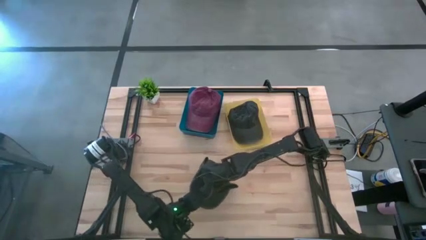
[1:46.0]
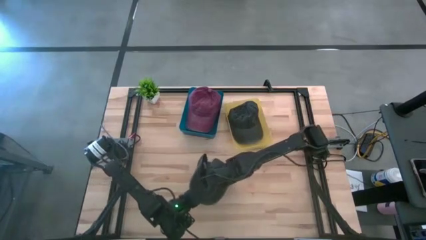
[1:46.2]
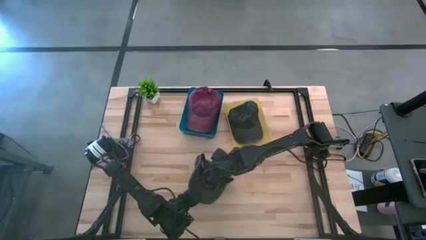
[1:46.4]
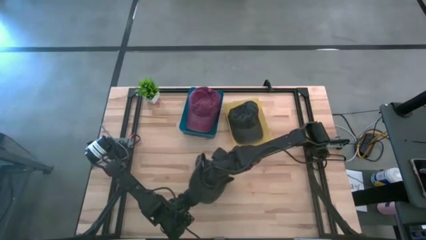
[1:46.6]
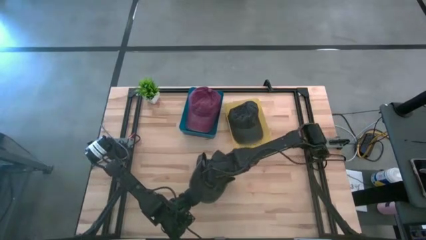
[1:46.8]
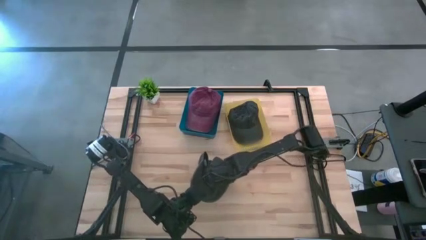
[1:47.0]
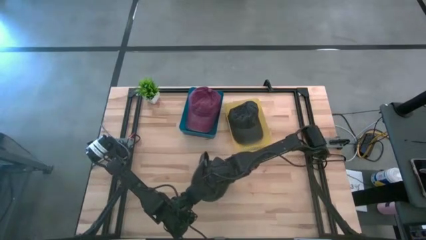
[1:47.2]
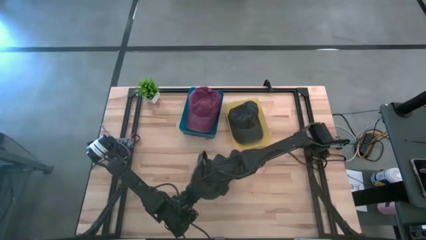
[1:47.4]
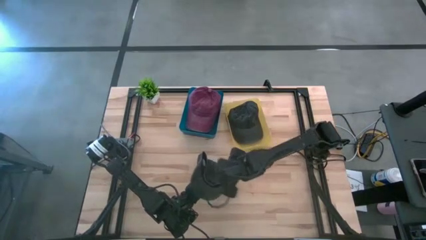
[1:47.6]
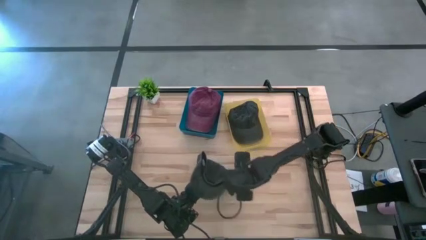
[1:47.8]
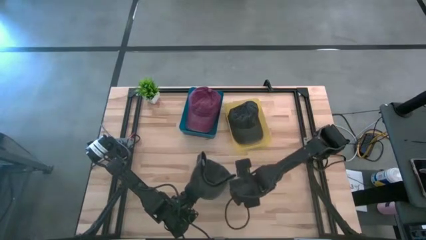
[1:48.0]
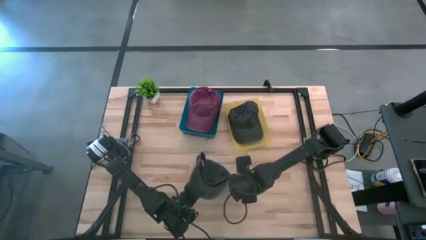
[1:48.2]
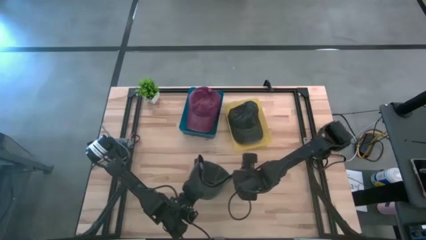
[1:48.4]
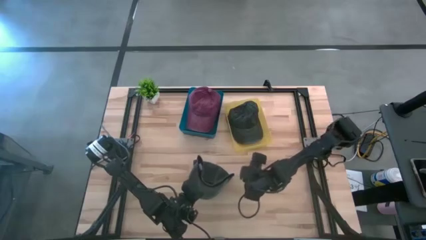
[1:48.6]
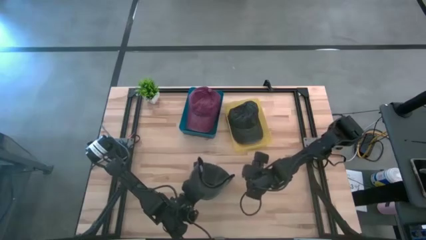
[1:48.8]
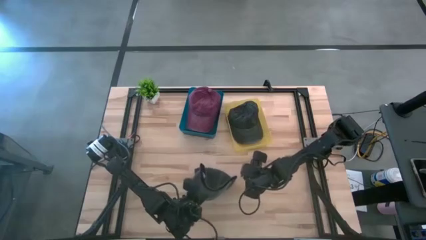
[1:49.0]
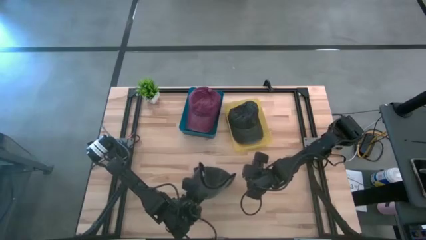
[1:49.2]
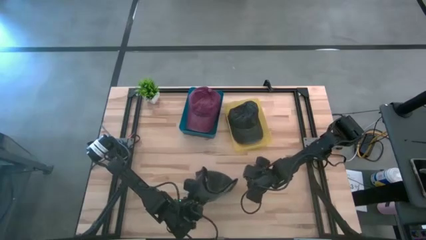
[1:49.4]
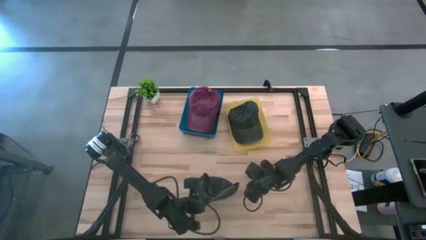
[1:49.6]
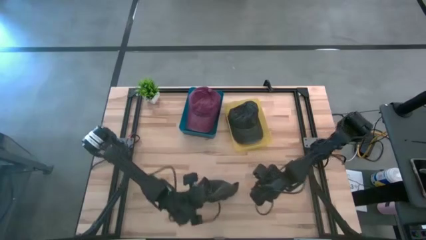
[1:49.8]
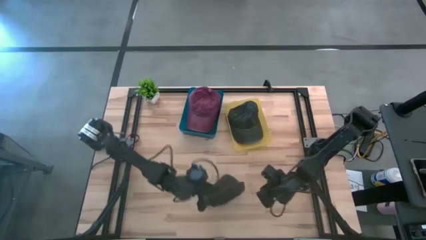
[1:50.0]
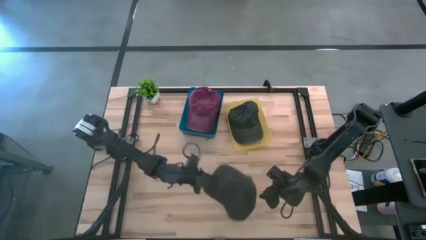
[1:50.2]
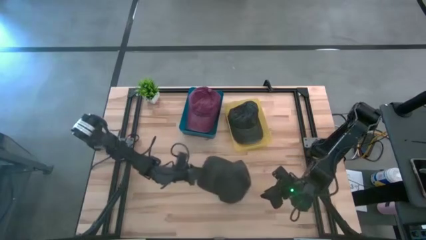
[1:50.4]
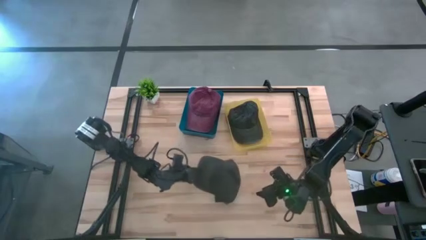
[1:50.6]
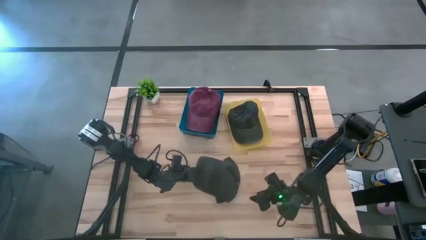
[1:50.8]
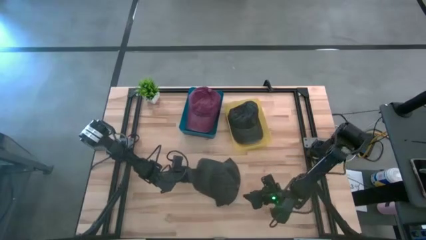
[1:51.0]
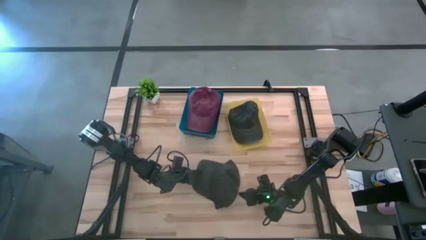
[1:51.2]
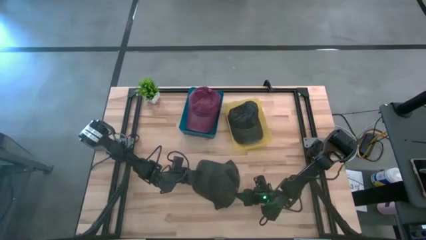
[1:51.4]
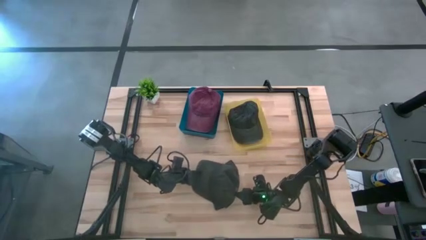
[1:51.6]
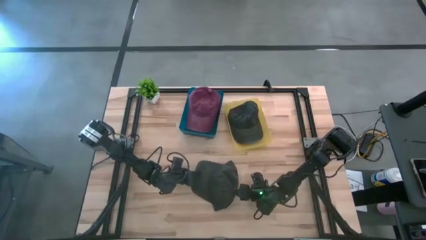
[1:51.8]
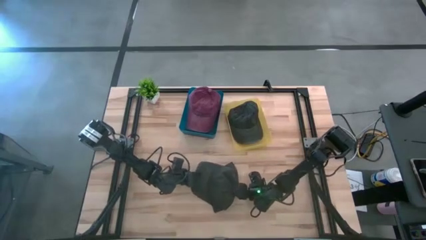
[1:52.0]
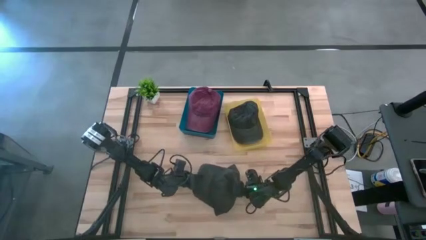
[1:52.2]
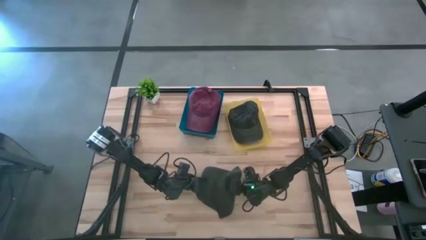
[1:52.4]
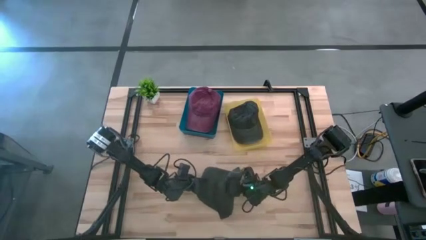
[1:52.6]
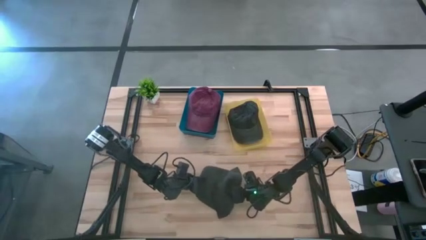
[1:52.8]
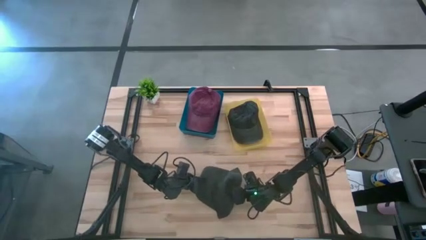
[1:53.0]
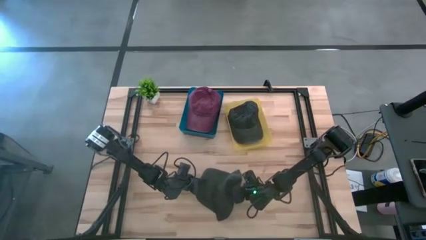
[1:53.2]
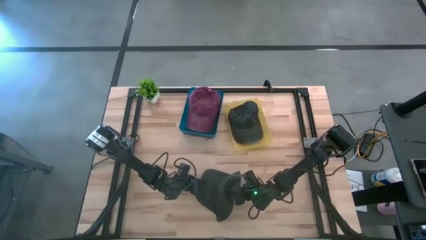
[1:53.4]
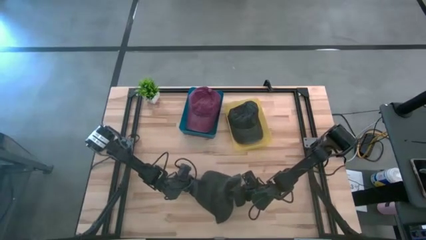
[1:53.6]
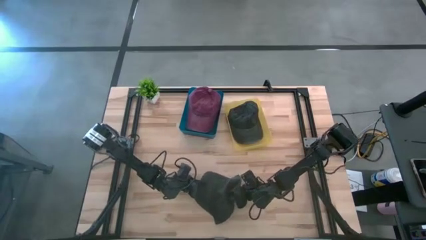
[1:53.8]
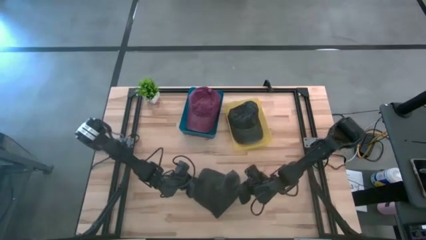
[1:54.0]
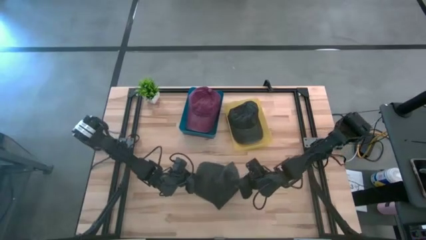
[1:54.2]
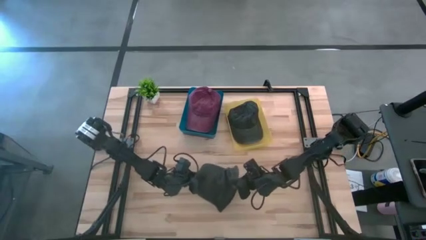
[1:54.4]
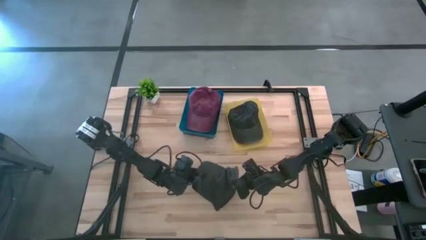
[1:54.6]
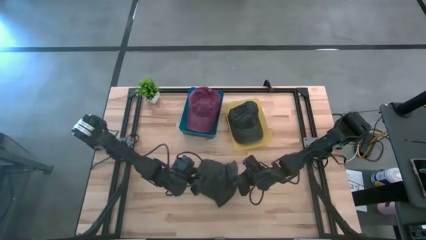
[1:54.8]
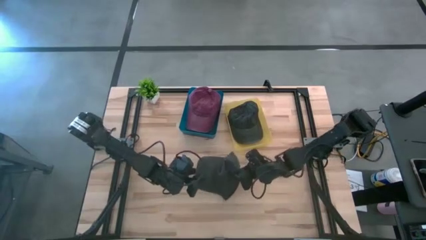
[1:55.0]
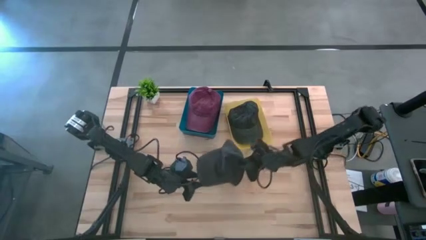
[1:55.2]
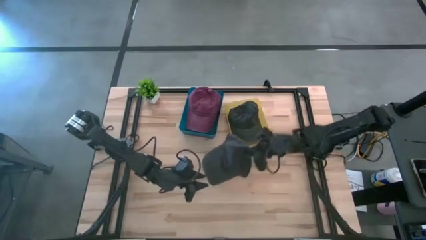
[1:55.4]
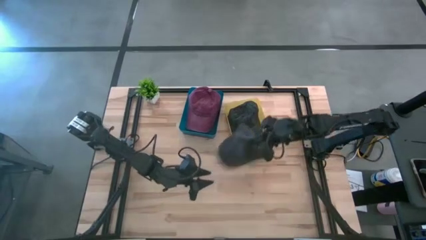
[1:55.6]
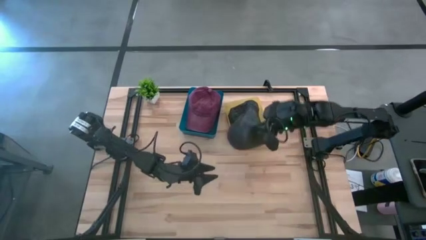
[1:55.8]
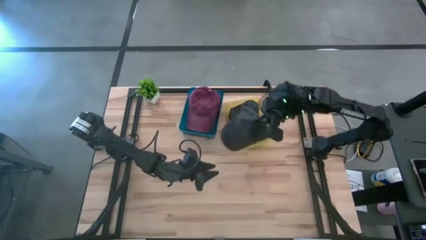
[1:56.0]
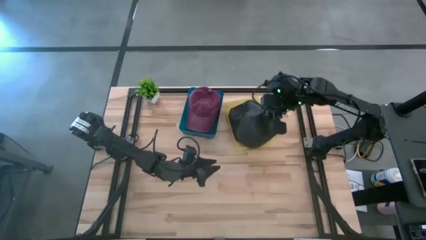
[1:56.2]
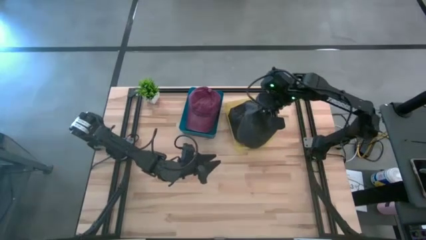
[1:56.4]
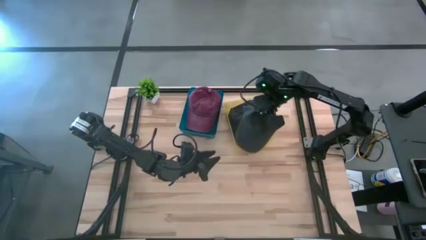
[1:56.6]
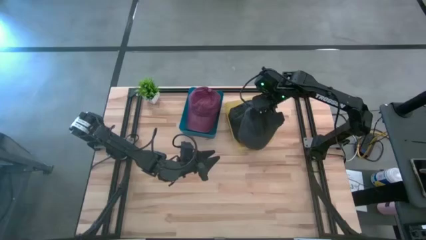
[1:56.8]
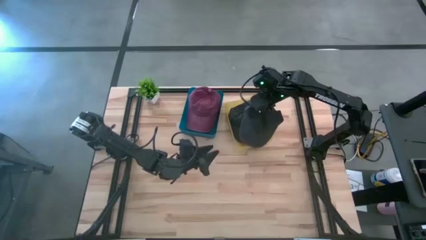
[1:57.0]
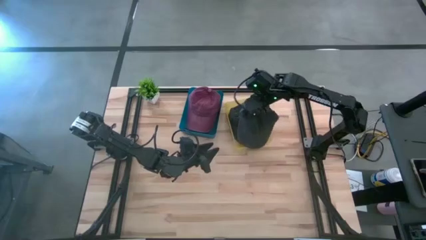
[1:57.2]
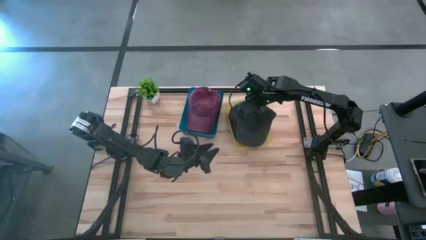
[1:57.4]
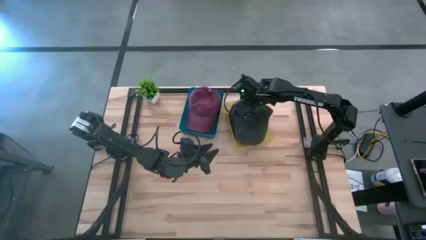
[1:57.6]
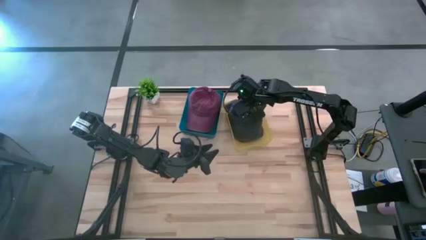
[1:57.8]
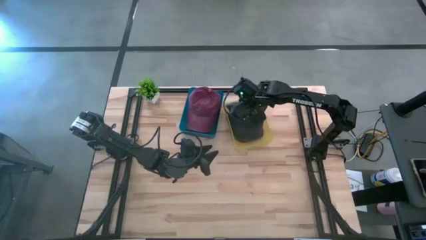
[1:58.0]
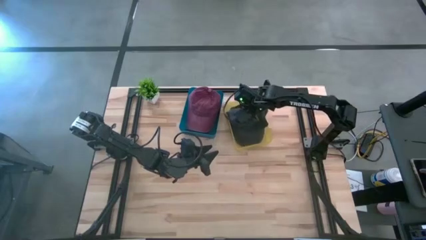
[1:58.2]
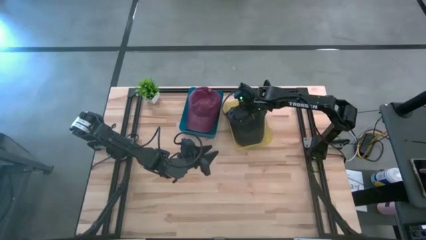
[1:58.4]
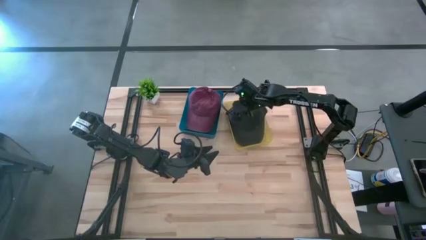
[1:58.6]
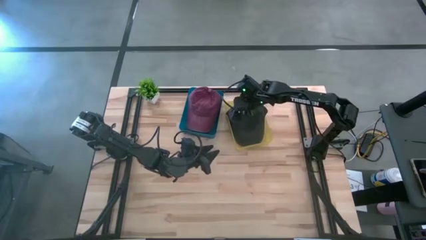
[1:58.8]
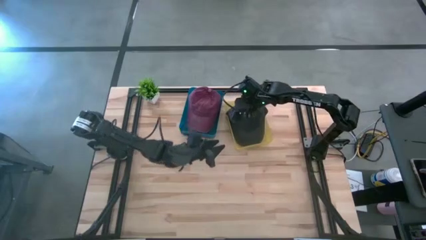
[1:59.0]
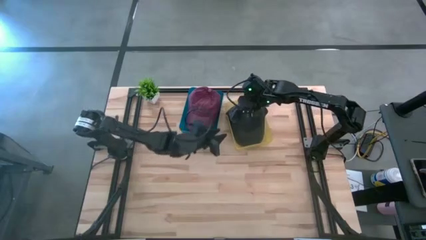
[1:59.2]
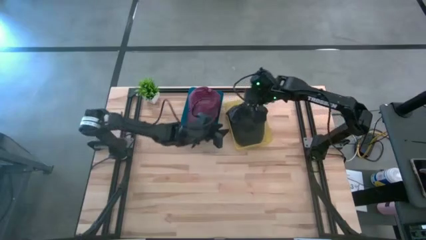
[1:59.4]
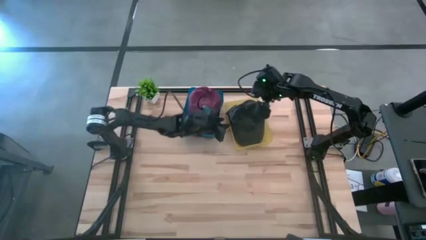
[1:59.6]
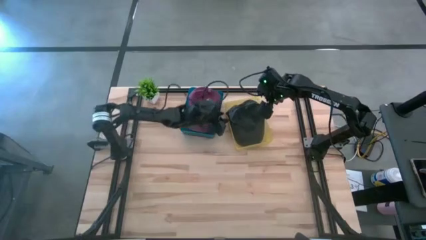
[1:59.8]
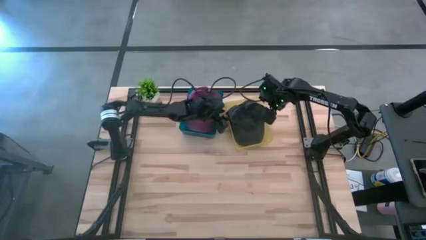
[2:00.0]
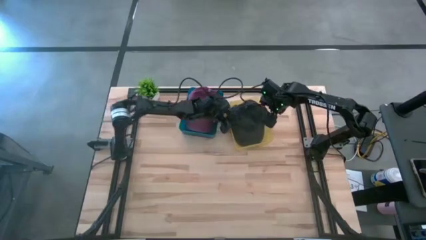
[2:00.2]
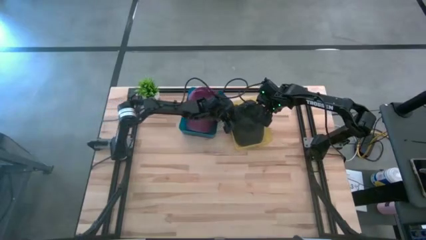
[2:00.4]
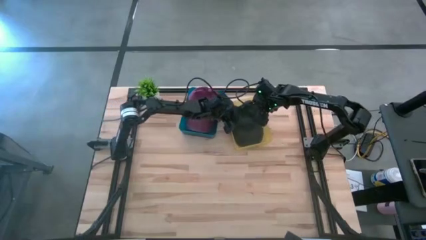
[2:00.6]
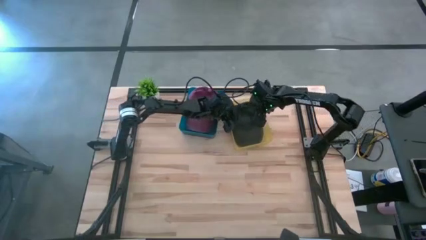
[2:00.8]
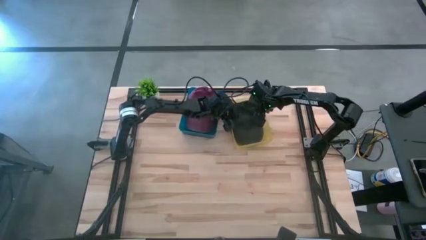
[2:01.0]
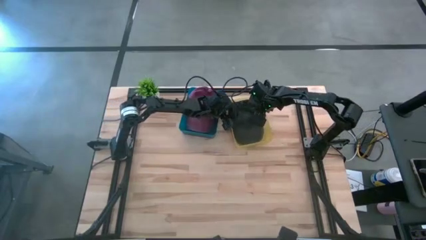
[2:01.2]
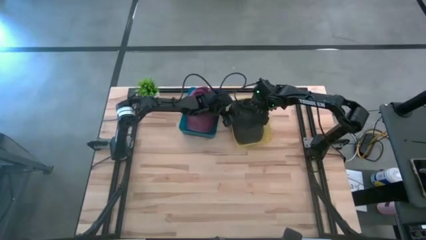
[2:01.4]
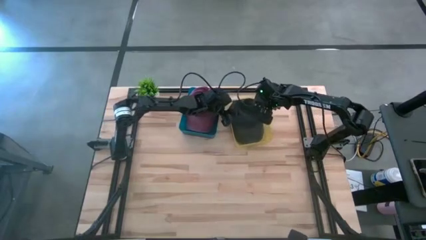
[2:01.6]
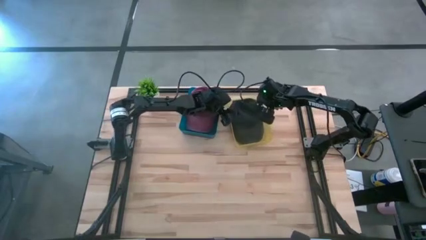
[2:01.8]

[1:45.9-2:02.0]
Task: Pick & Place hat
Put the black cap into the yellow bin

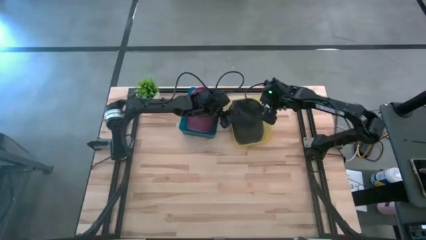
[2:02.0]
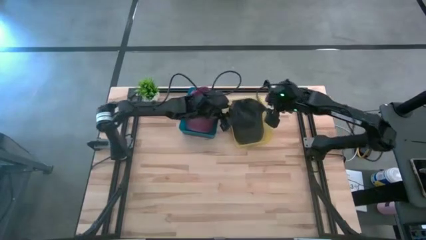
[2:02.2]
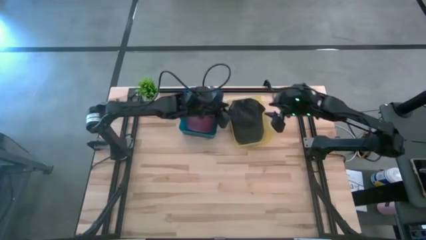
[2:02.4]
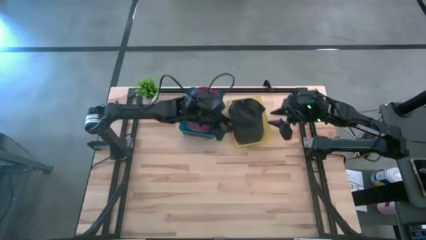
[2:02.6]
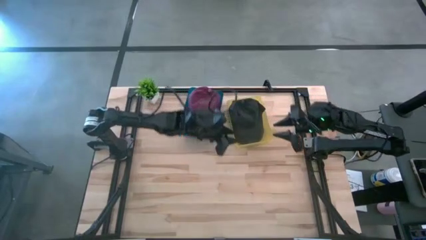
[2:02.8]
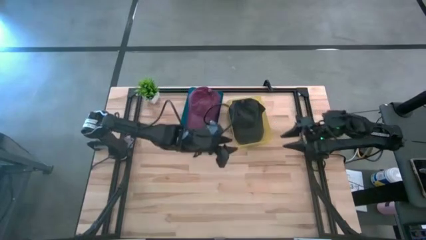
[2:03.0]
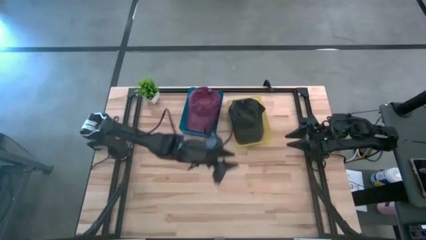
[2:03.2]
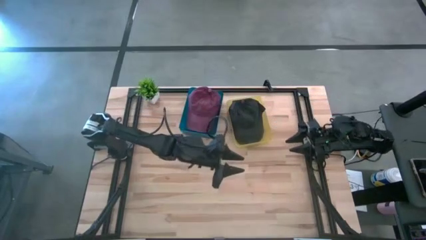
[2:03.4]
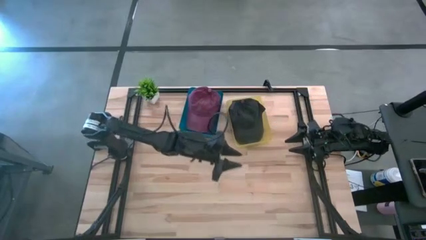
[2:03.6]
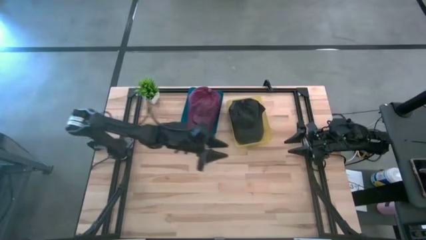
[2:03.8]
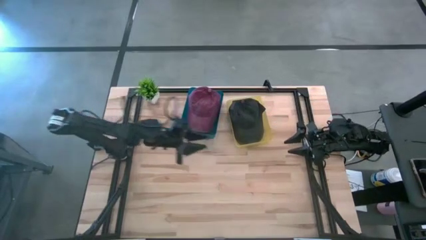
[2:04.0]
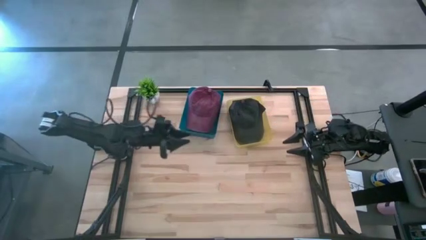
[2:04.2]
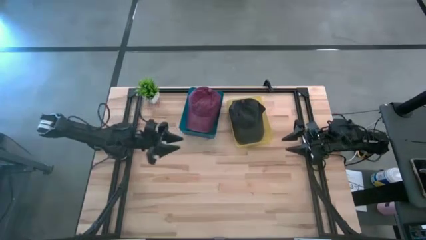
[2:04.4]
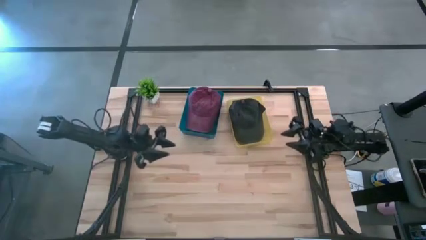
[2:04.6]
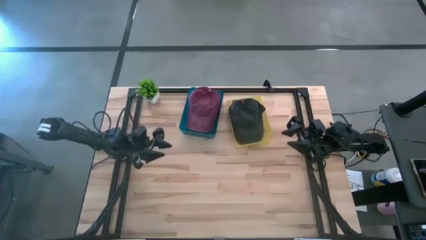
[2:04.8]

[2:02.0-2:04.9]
Return to Home Position
